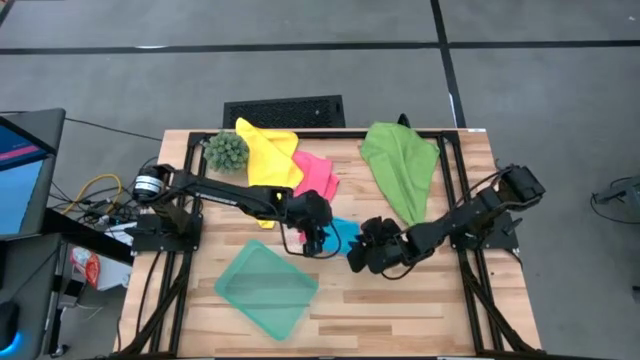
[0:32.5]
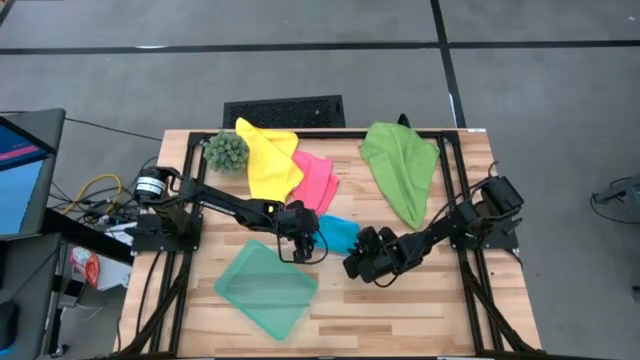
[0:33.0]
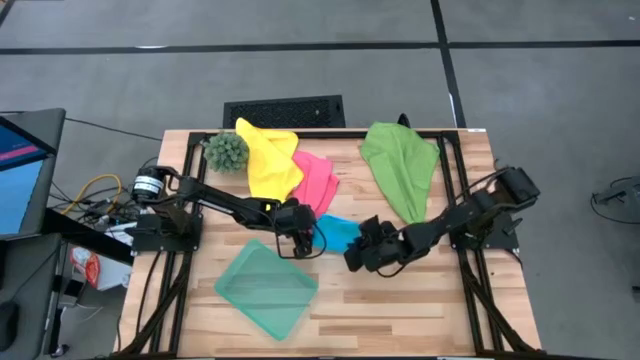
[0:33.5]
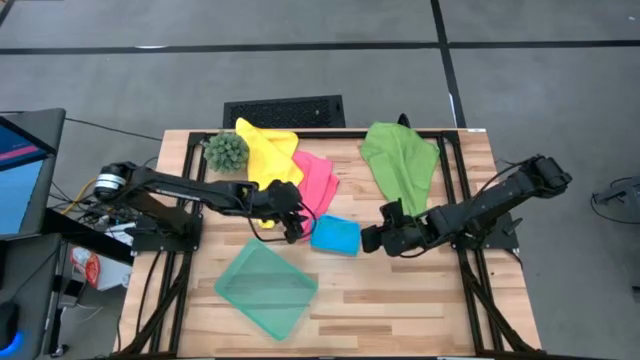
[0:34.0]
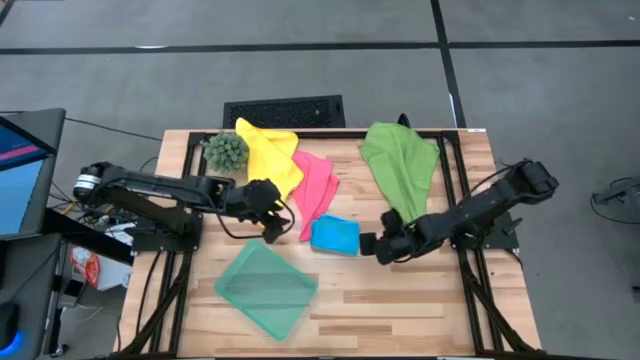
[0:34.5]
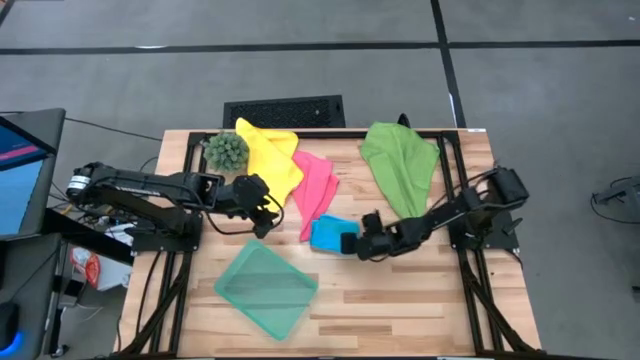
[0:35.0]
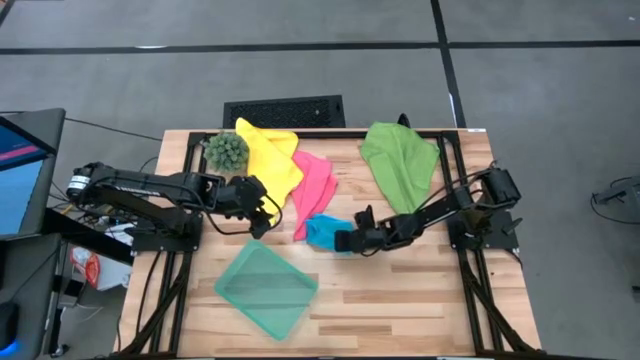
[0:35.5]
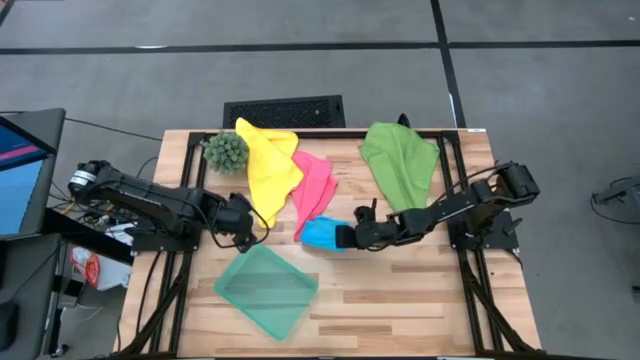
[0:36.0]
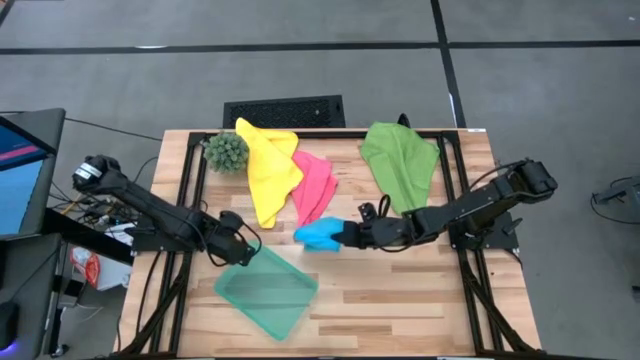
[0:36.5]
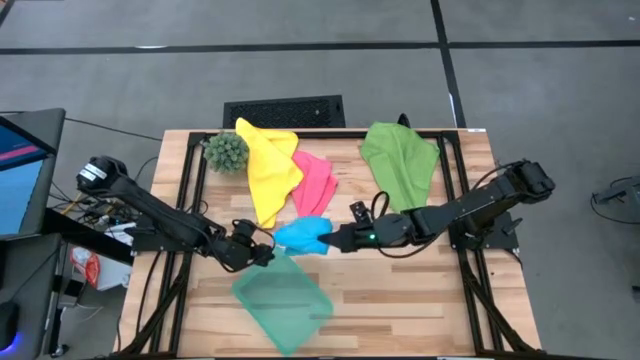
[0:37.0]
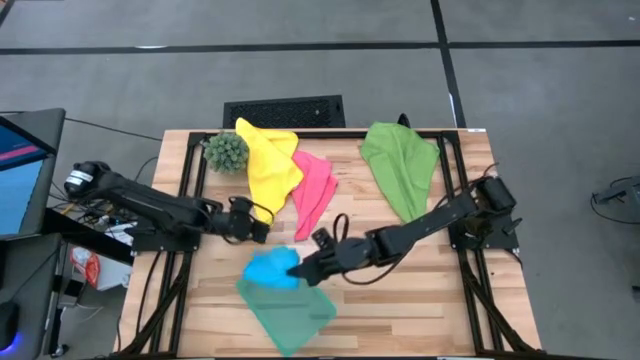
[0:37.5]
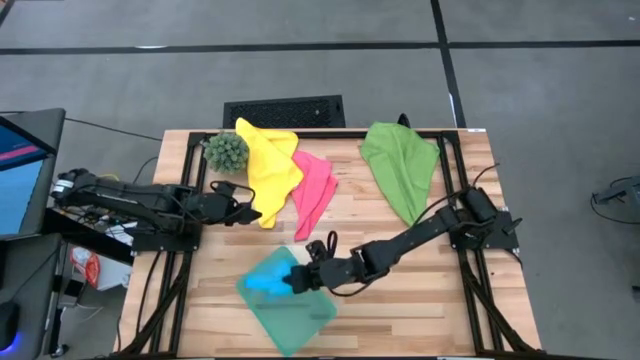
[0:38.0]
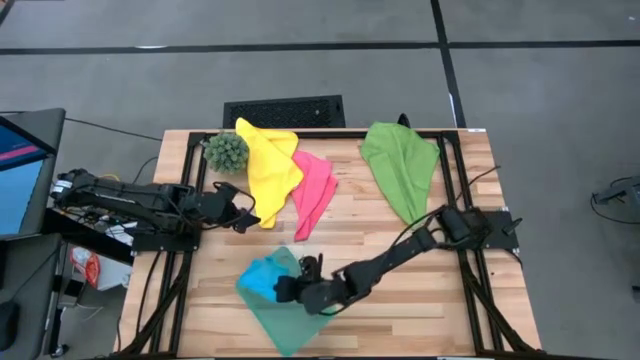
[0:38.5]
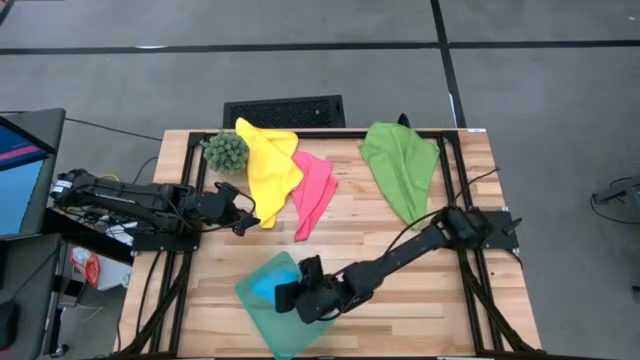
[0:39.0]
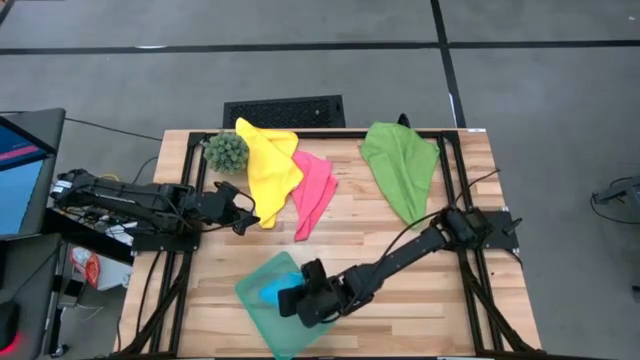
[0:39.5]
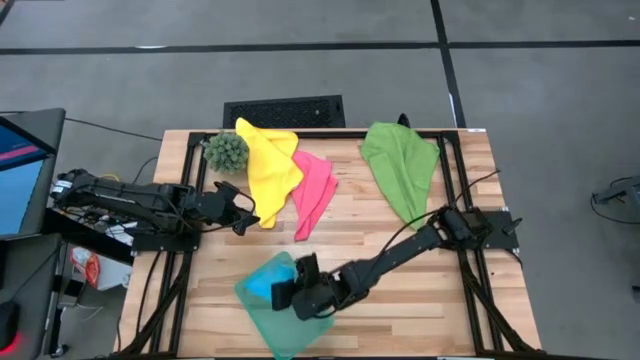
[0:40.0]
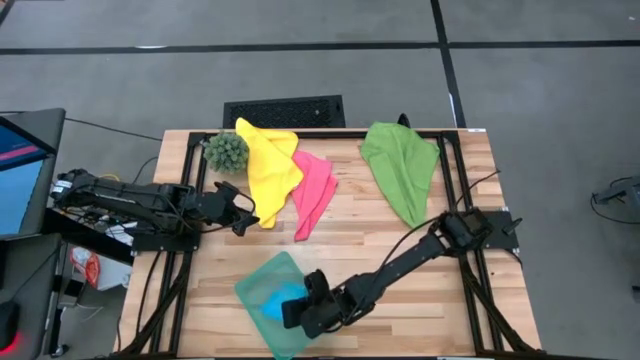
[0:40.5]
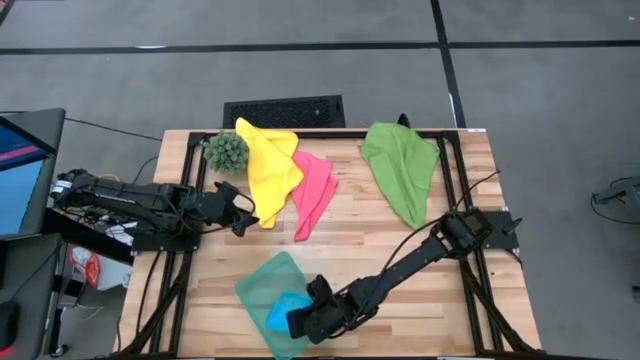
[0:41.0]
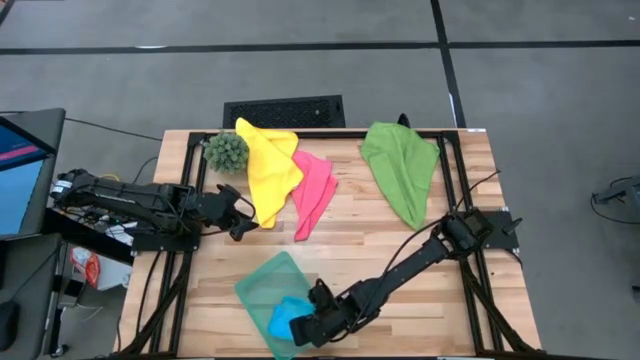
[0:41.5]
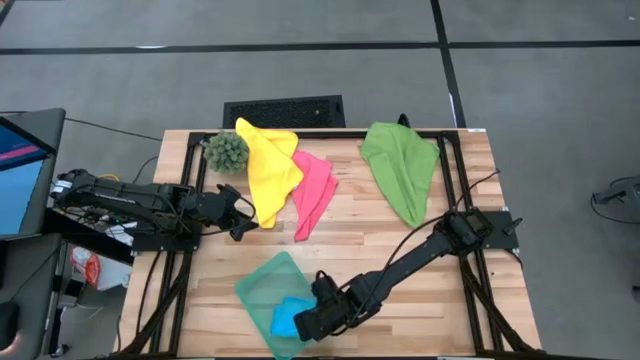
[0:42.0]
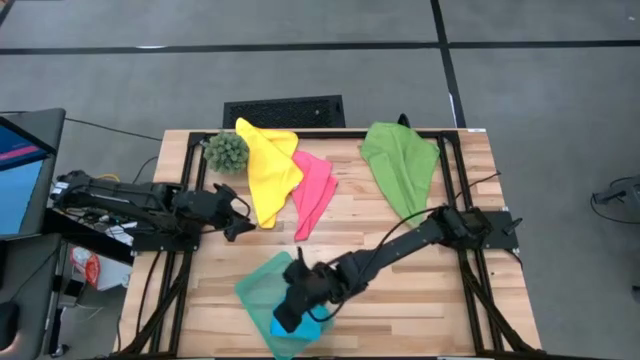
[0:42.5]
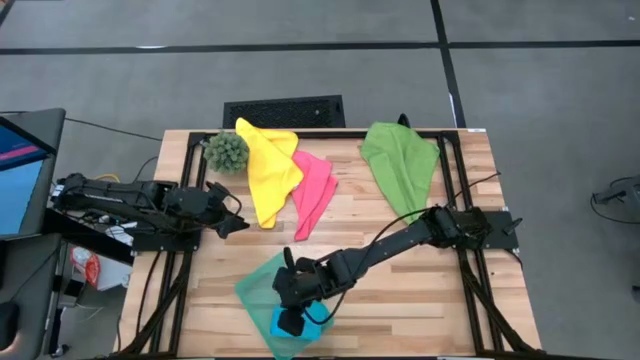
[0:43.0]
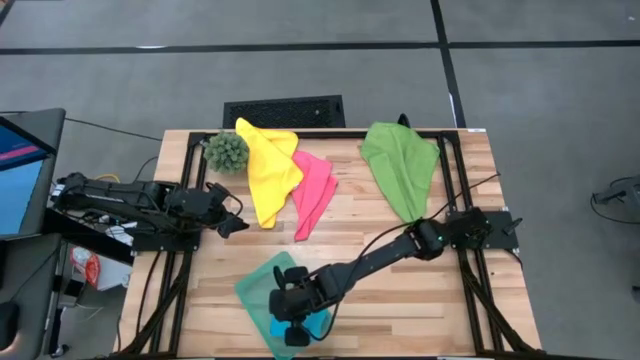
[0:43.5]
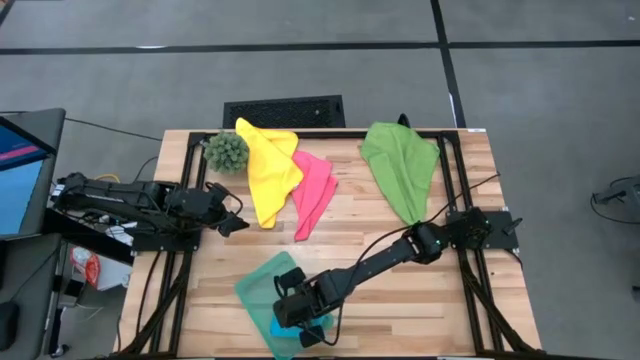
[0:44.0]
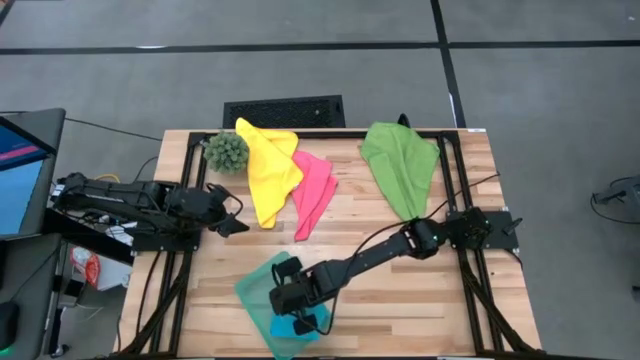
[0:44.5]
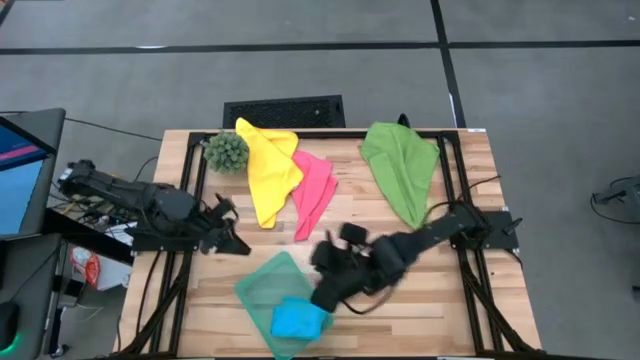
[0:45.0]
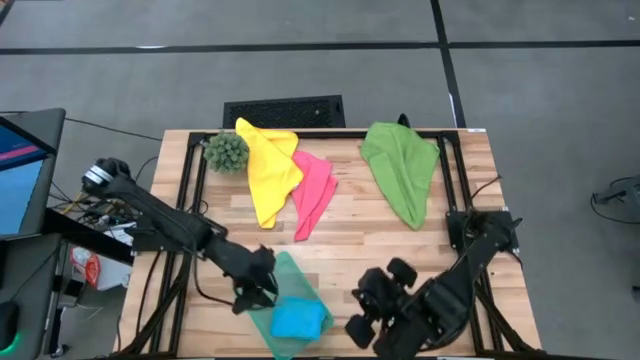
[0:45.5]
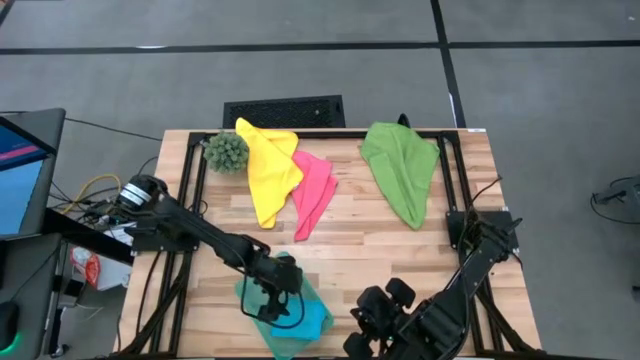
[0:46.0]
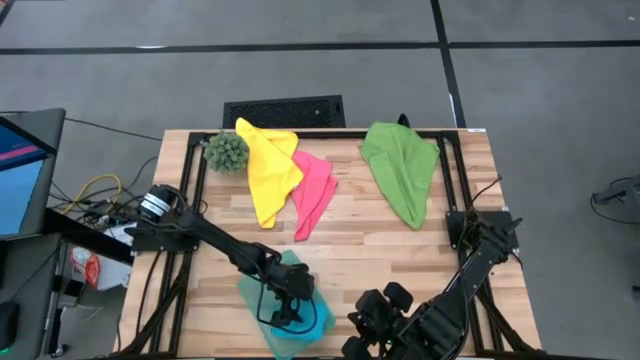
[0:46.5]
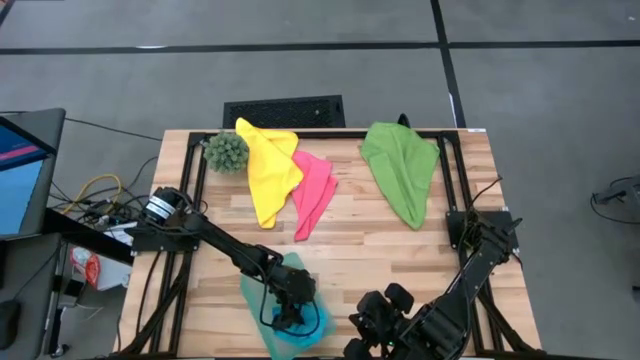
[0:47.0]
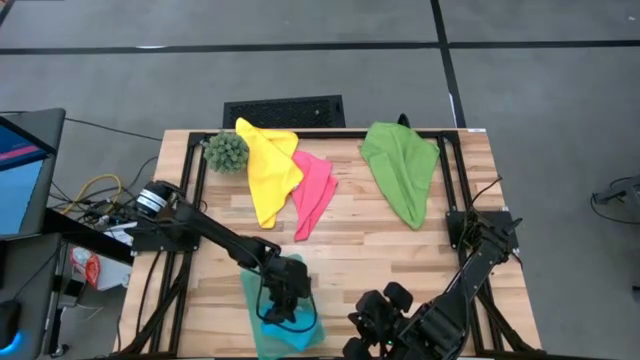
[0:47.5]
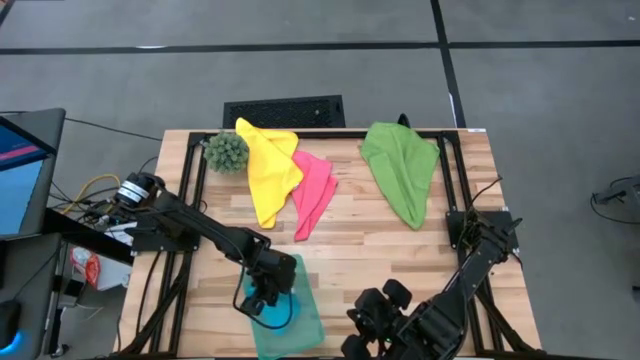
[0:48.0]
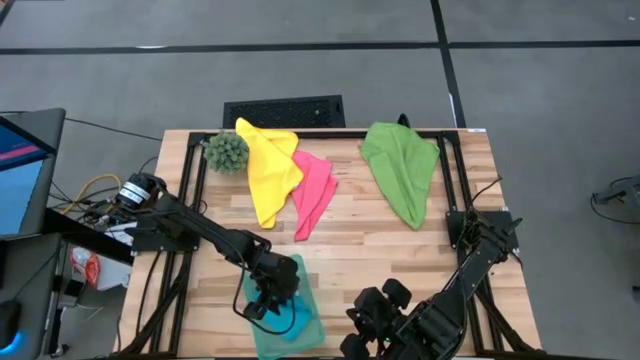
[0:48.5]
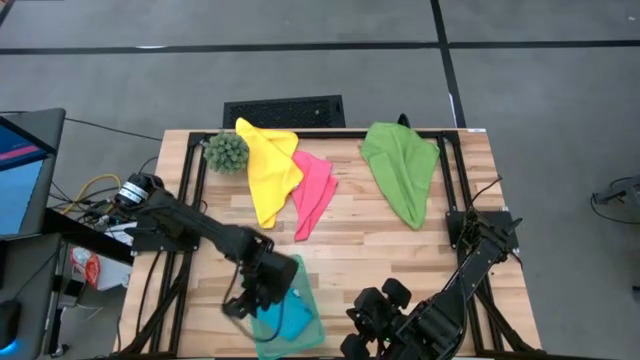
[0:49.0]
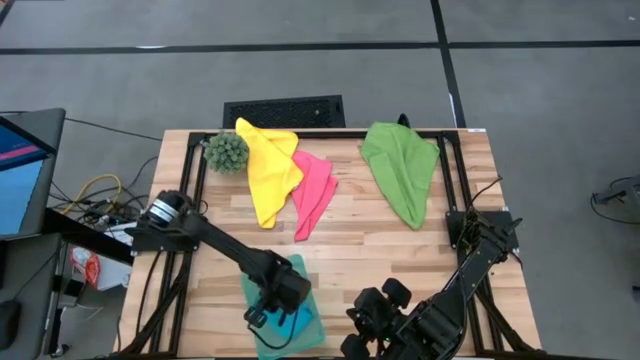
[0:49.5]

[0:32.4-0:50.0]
Task: Fold microfiber towels
Put the folded blue microfiber towel into the bin

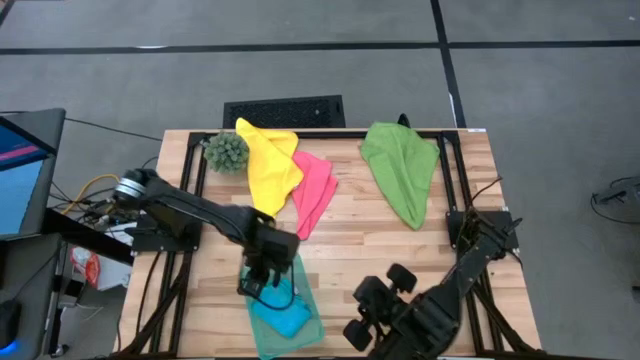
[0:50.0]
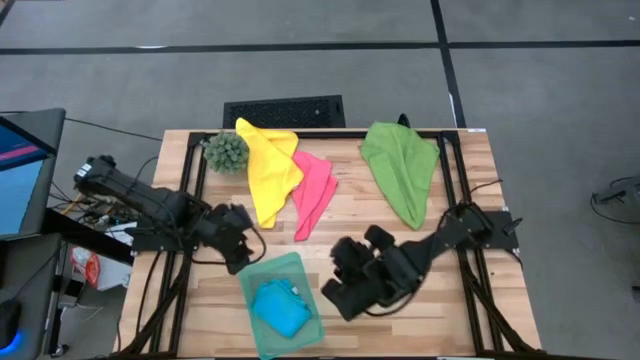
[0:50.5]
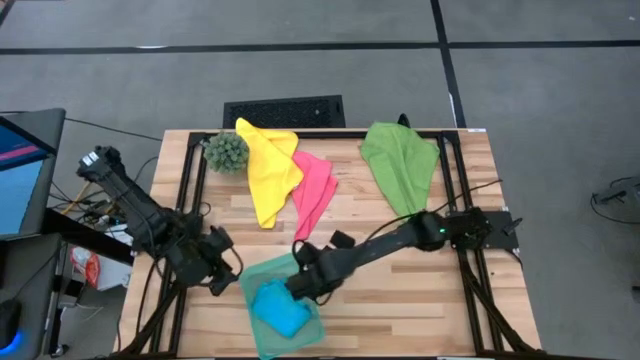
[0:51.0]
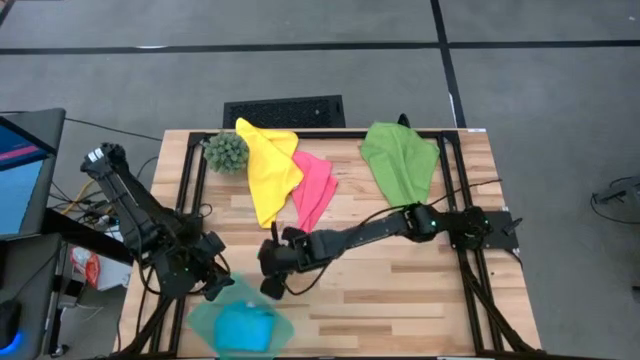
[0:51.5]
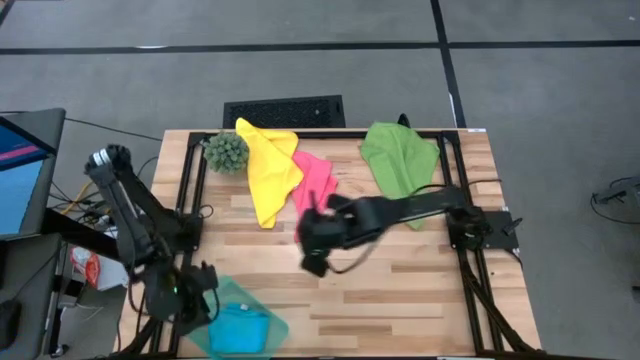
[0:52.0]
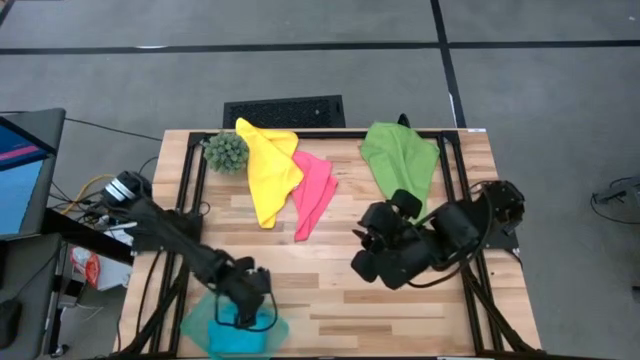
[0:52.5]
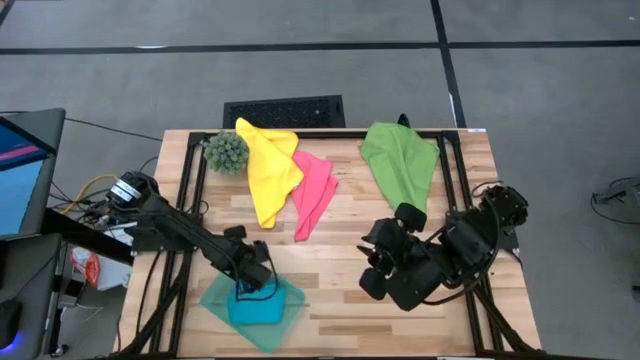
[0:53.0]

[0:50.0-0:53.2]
Adjust the bin
